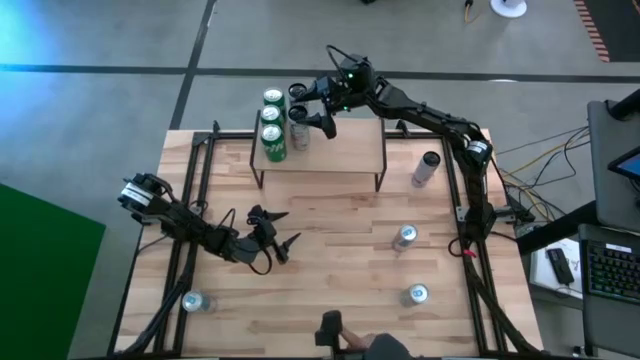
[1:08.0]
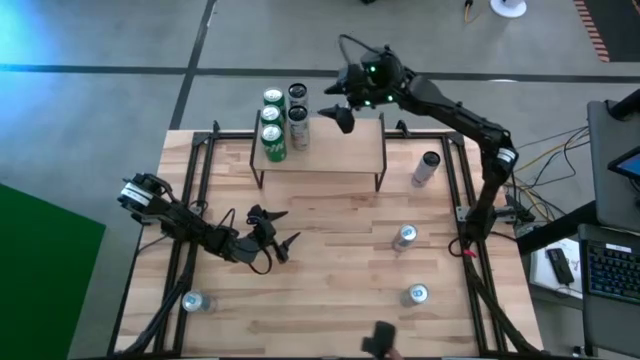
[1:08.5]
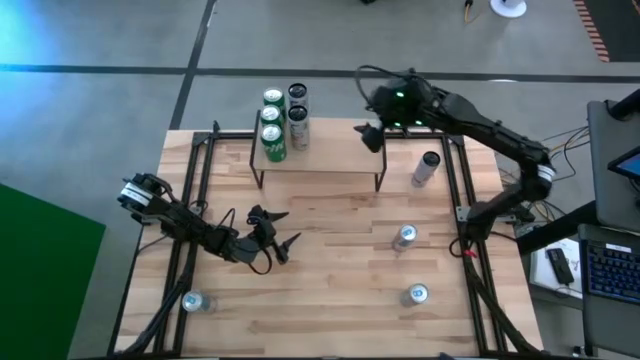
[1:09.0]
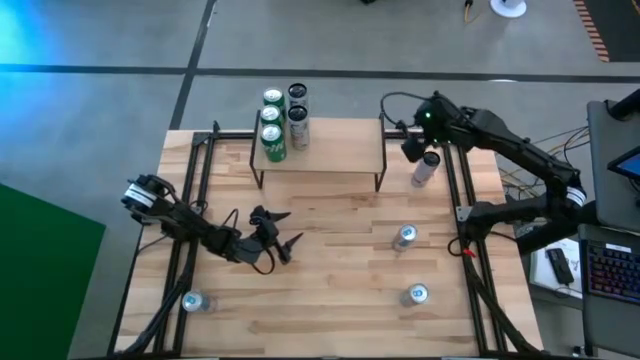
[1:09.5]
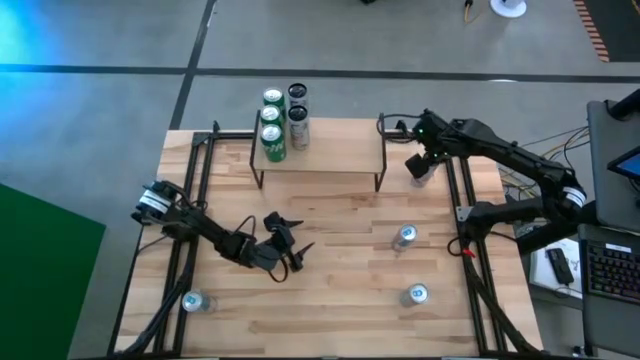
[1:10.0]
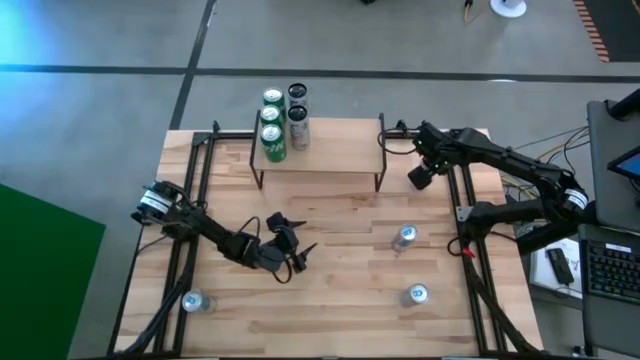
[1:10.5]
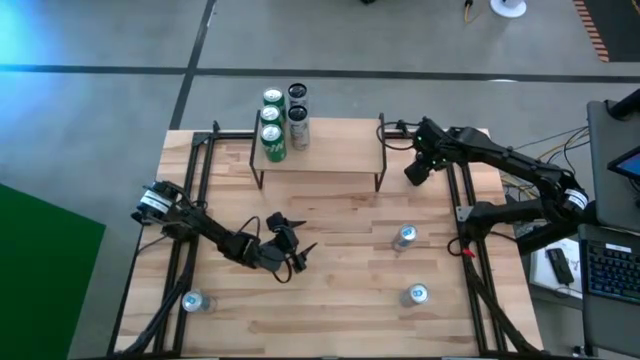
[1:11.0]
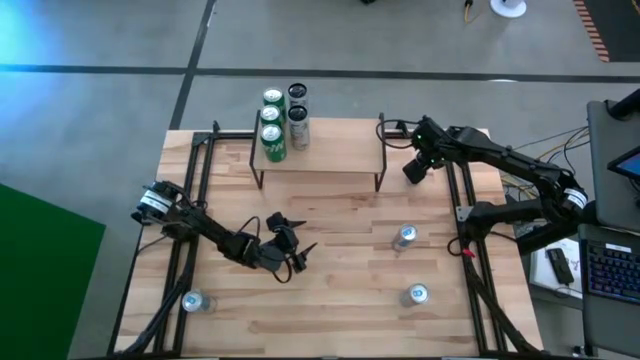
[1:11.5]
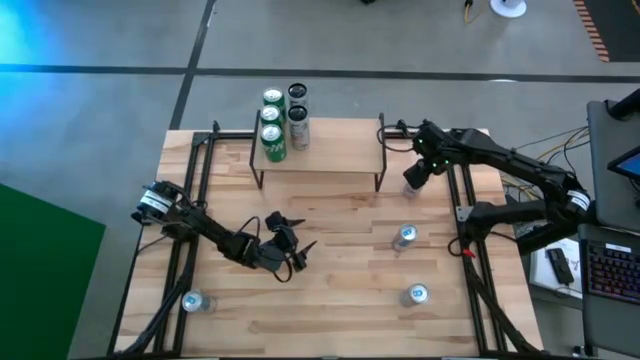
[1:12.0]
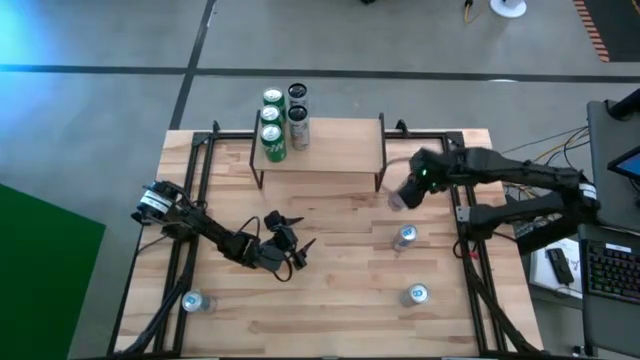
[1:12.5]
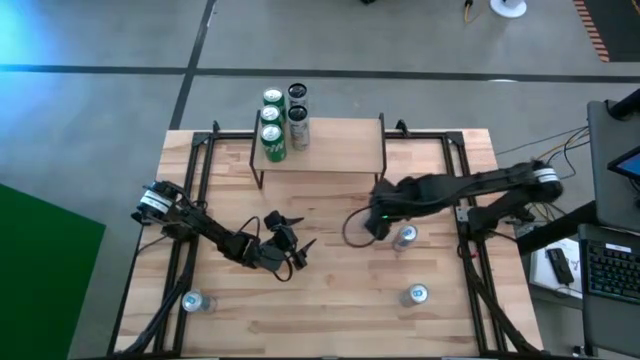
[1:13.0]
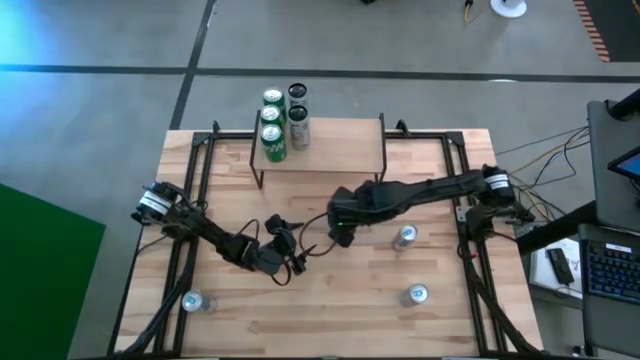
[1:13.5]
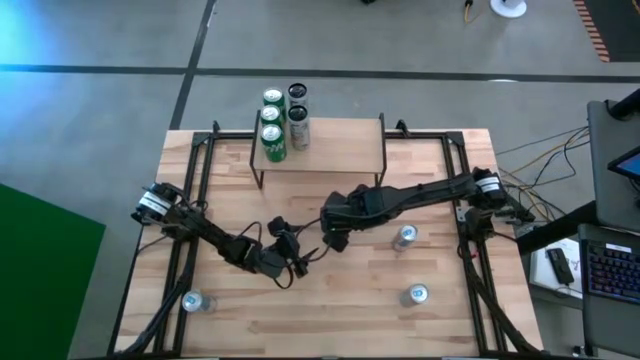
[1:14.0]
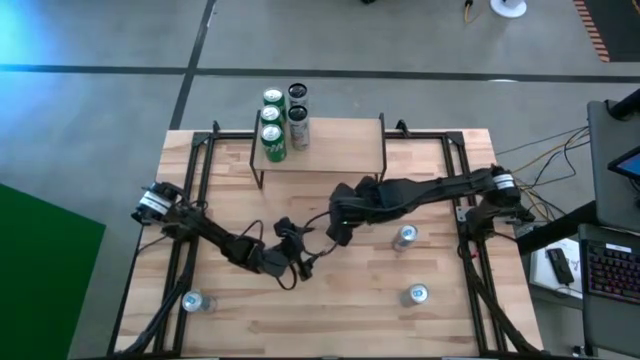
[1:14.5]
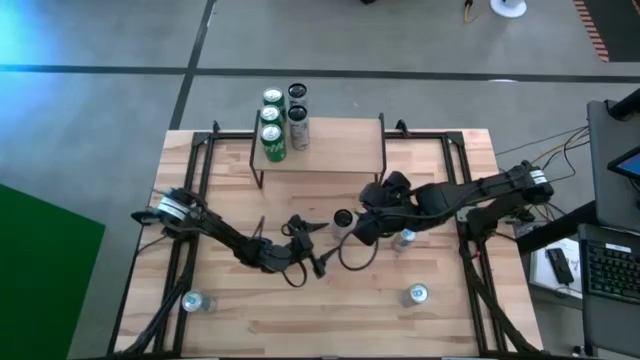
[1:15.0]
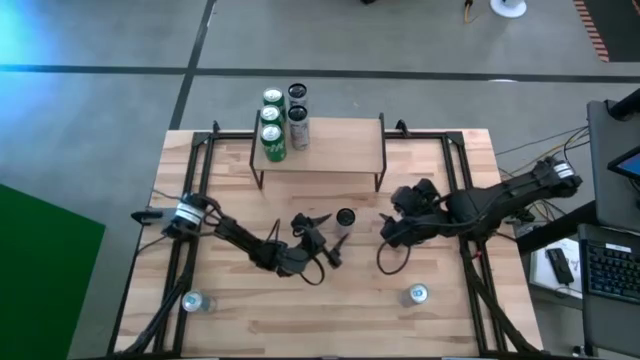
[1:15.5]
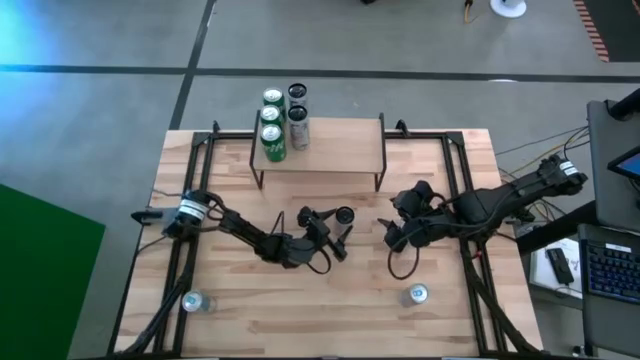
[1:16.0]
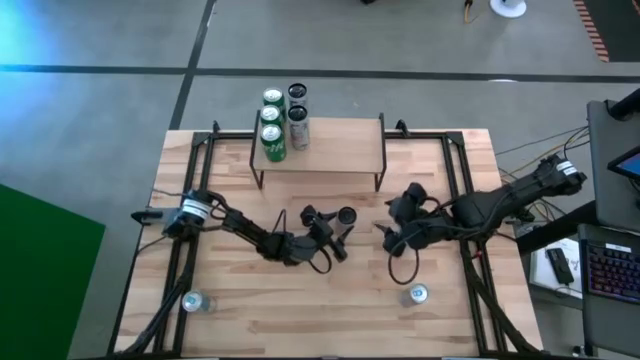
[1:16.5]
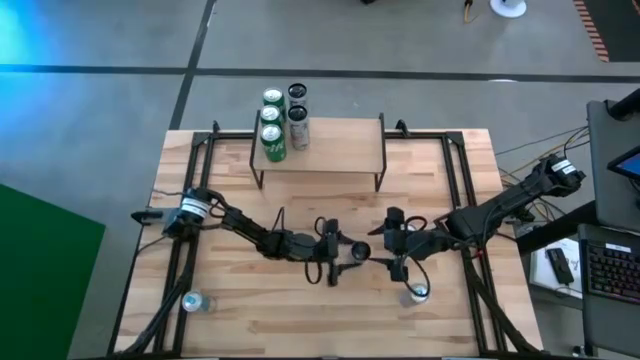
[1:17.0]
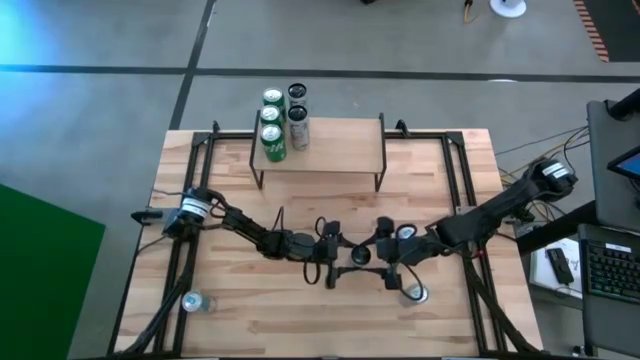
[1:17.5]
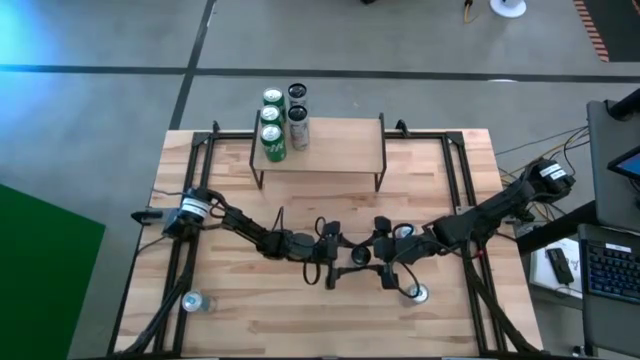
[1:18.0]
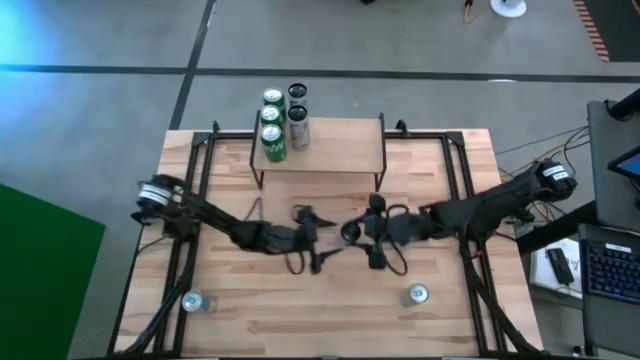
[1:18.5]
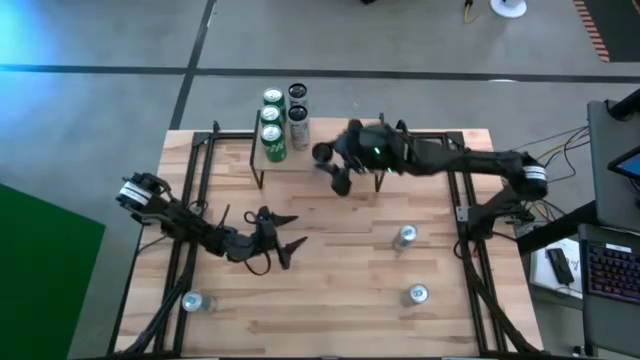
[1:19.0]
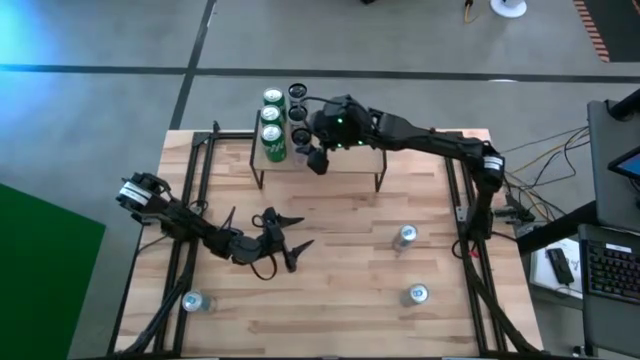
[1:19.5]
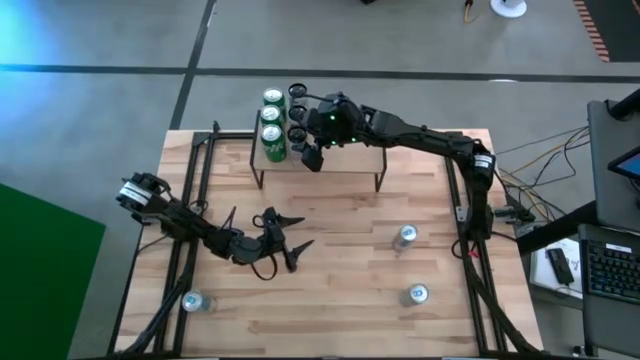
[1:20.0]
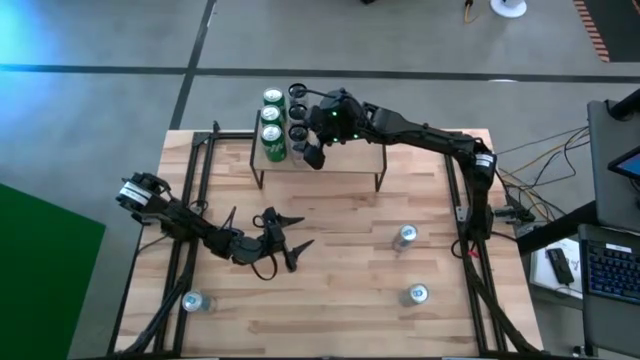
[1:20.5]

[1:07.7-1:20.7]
Task: Place canned beverage on shelf
Put the white soda can on the shelf aligned with other white soda cans

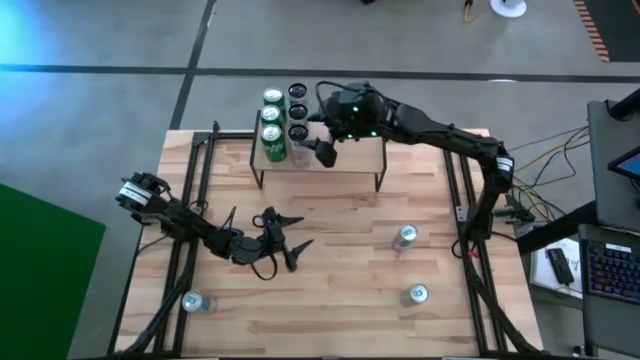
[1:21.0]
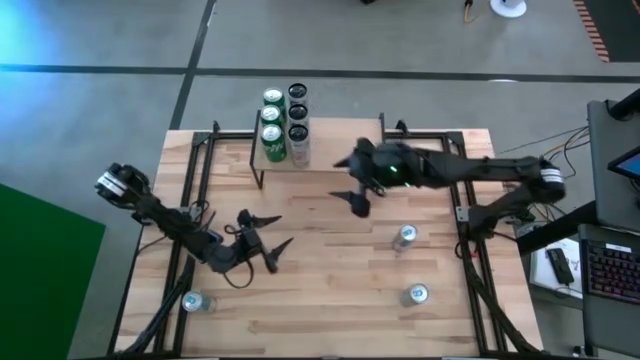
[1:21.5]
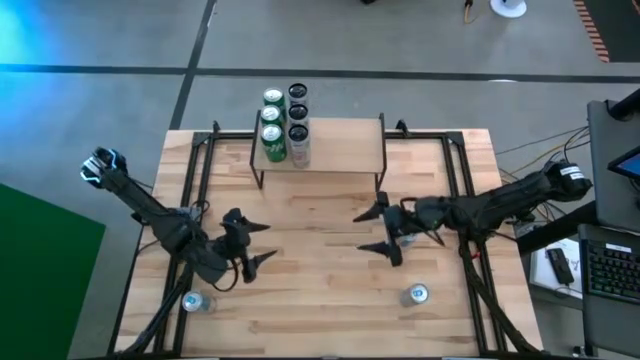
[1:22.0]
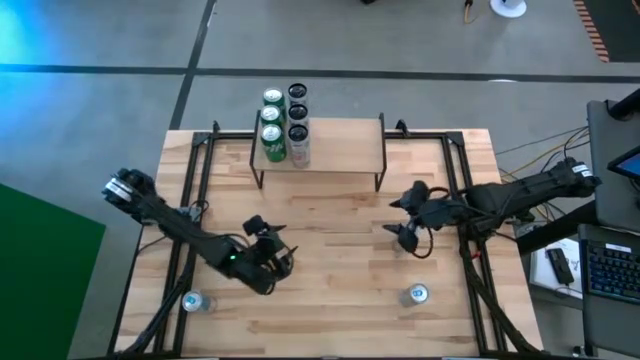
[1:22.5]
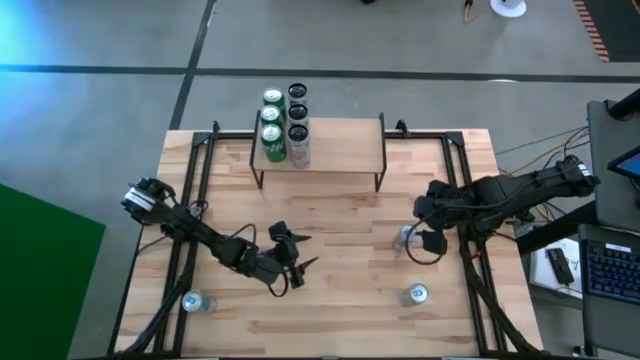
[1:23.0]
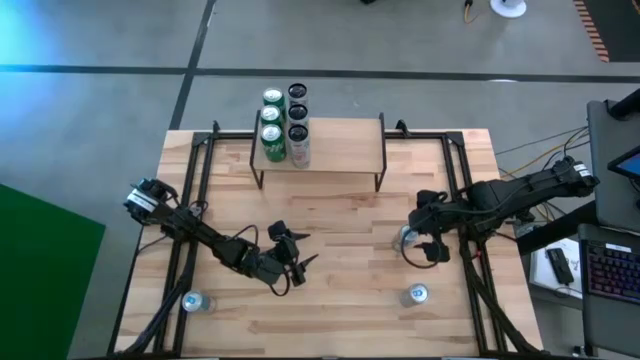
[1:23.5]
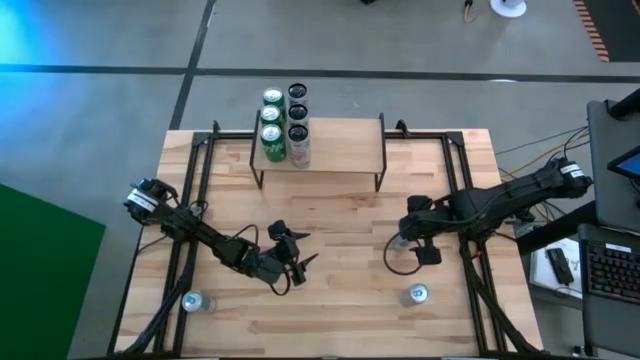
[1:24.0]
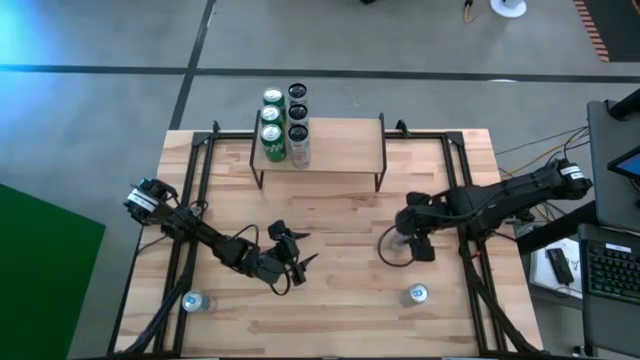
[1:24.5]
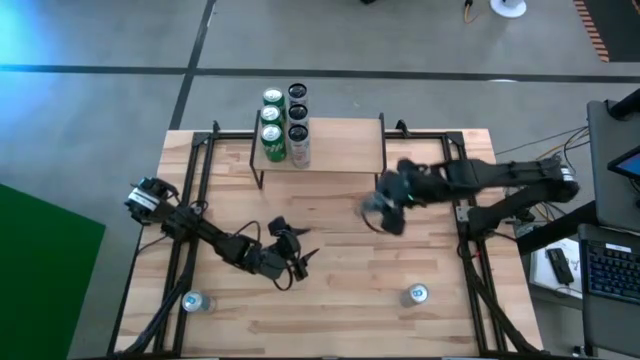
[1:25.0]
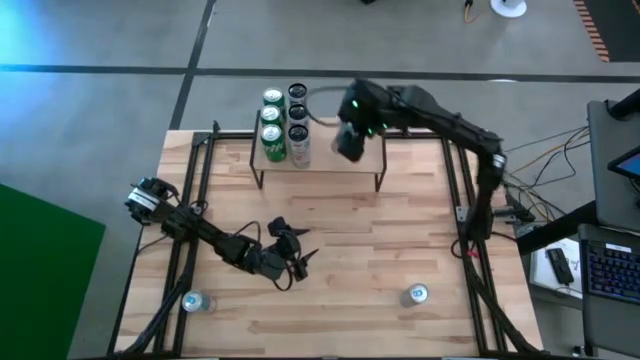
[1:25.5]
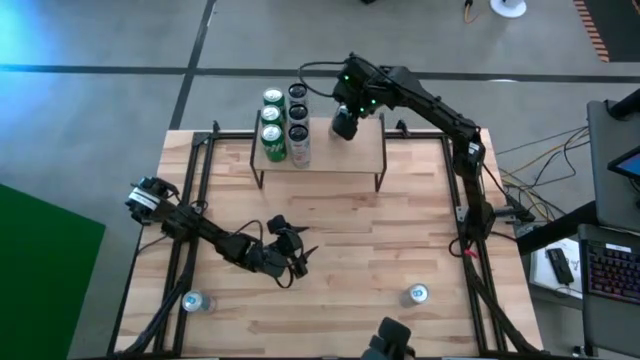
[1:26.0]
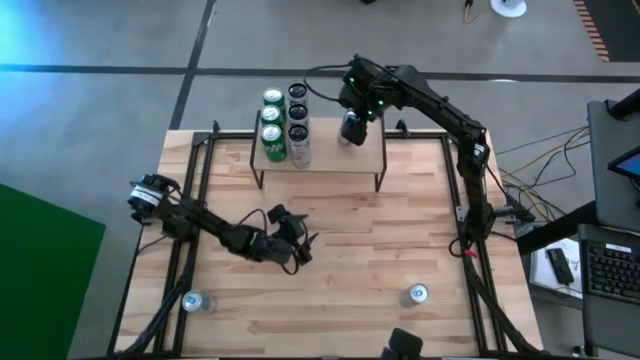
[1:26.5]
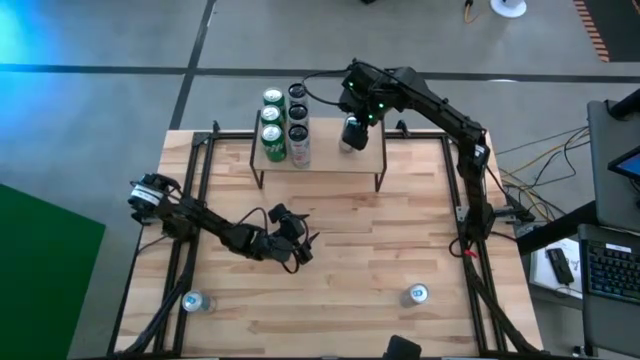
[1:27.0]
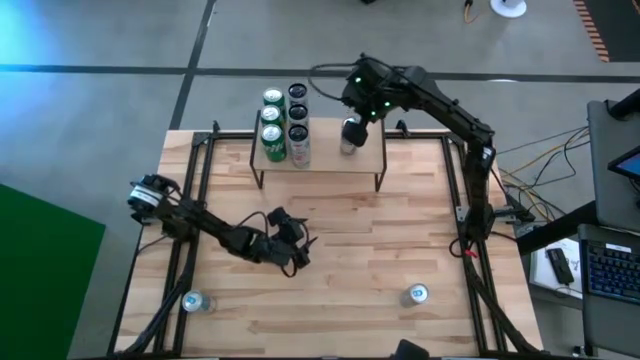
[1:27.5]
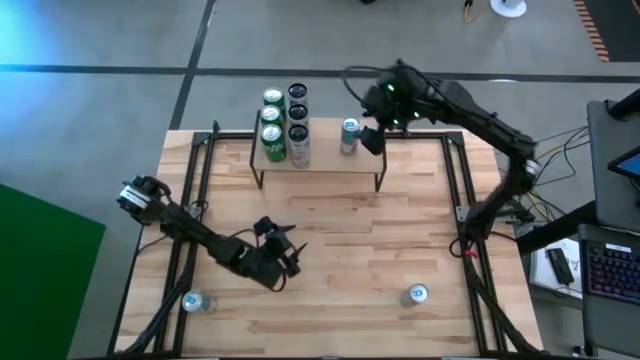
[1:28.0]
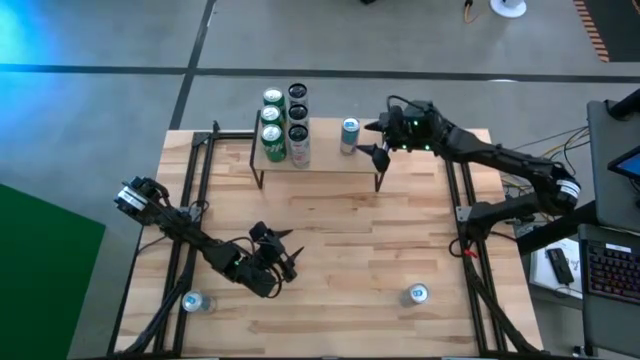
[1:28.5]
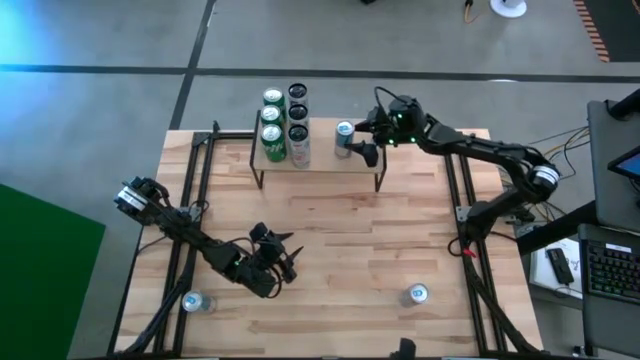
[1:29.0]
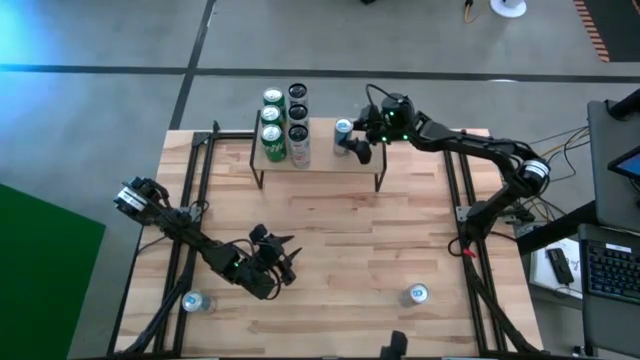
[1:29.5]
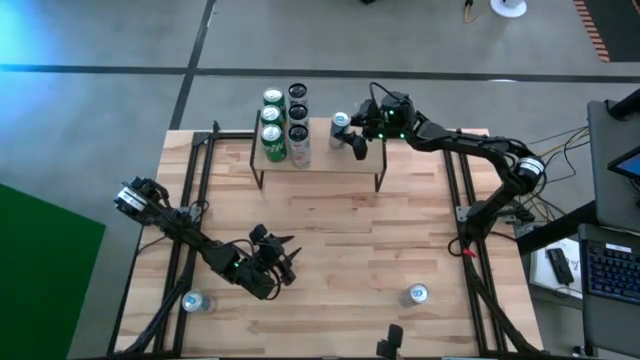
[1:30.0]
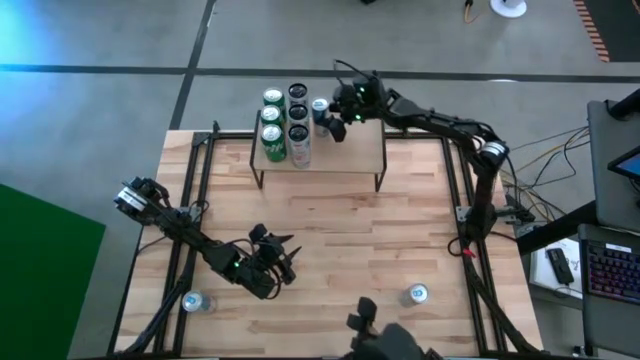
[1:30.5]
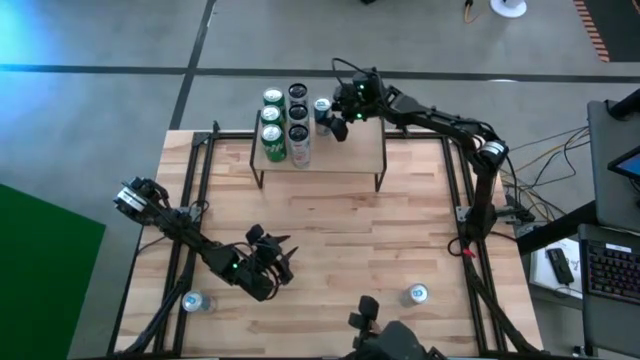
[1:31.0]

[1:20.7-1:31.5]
Put the top blue soda can on the shelf
